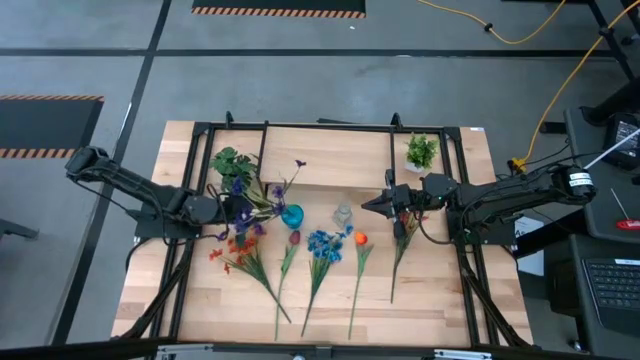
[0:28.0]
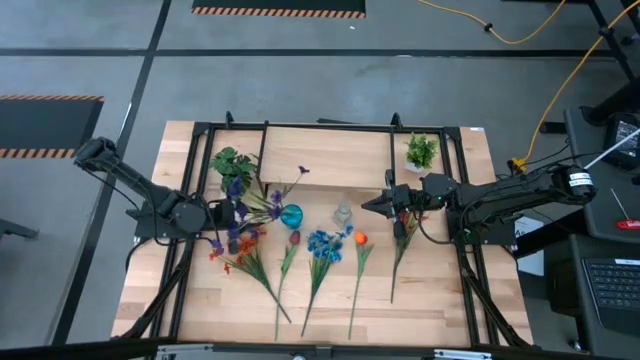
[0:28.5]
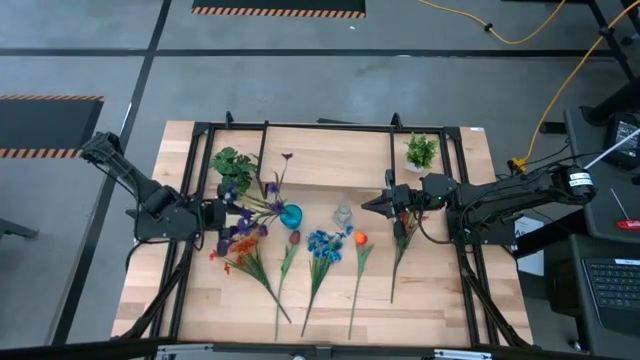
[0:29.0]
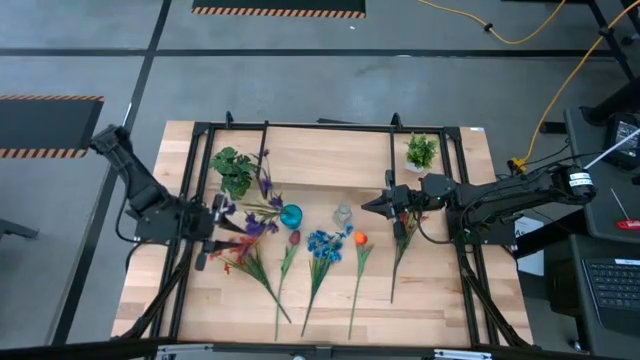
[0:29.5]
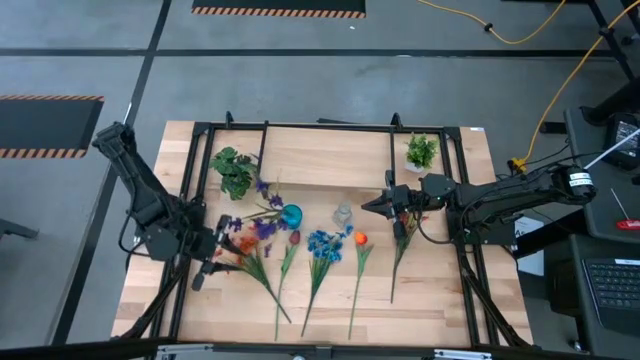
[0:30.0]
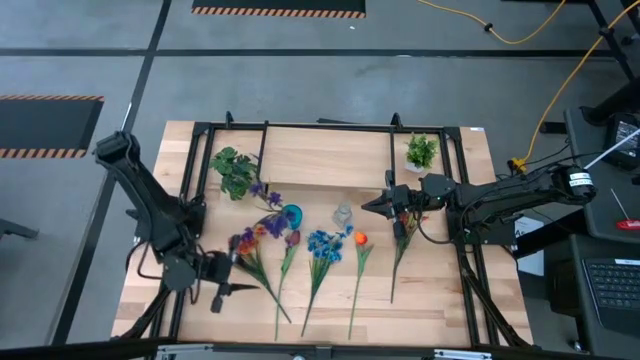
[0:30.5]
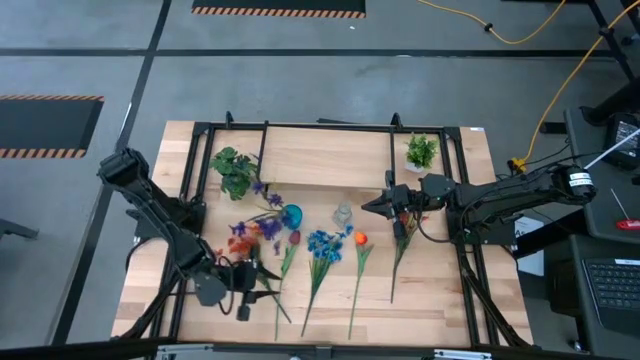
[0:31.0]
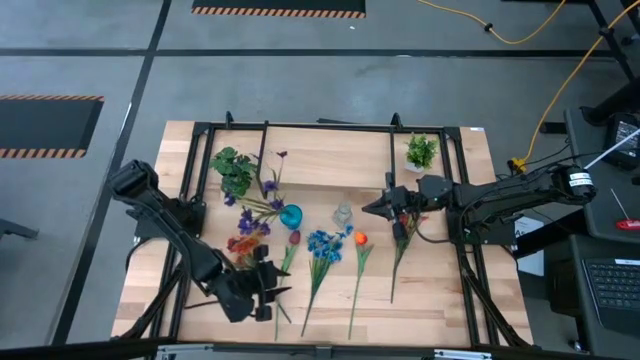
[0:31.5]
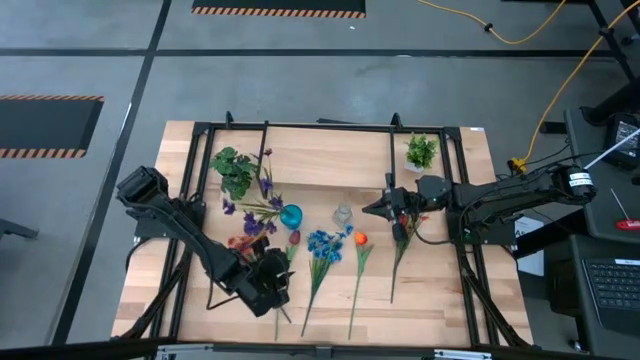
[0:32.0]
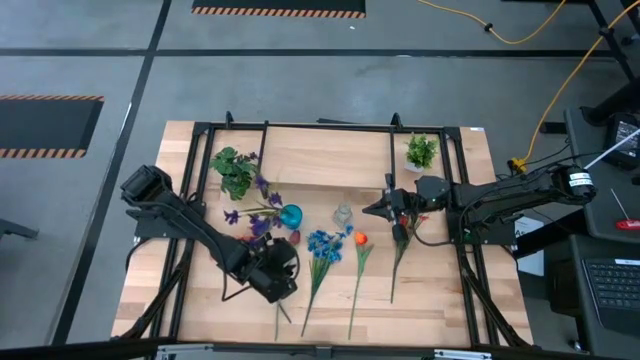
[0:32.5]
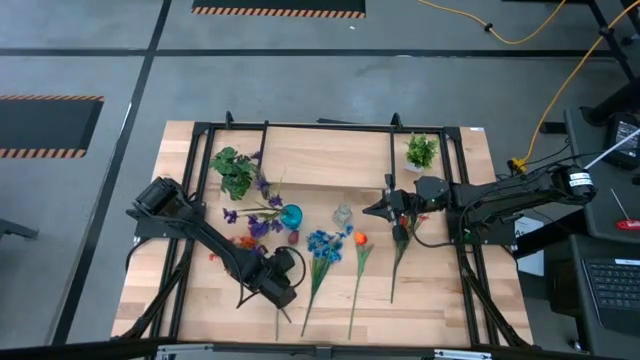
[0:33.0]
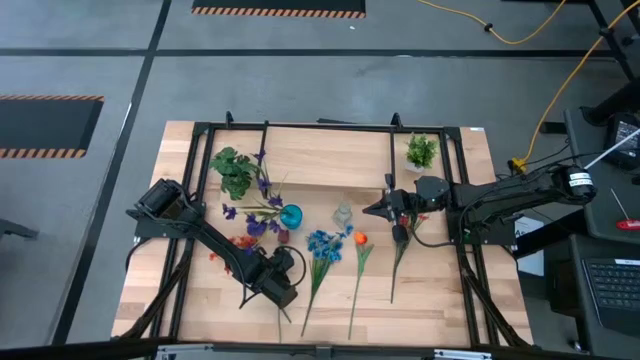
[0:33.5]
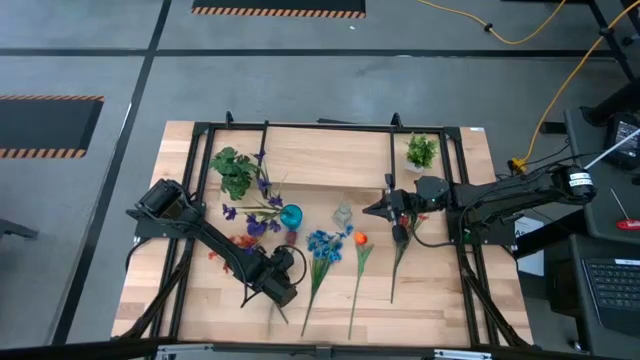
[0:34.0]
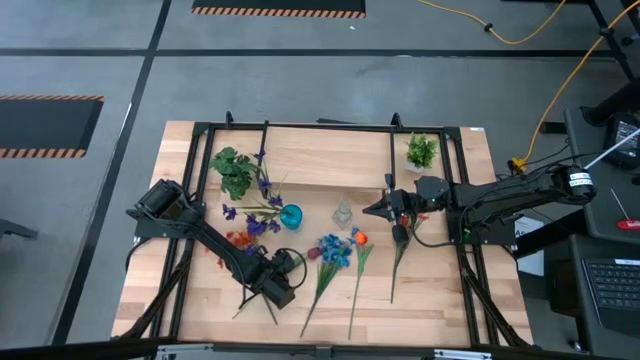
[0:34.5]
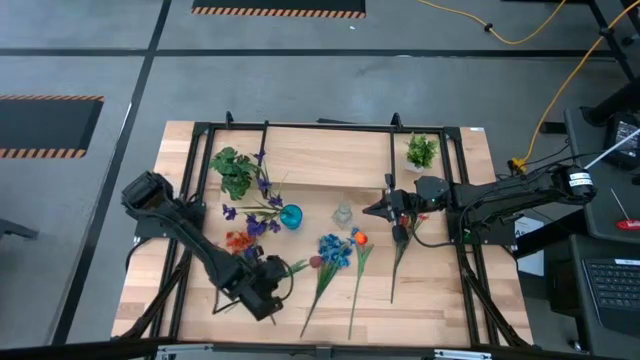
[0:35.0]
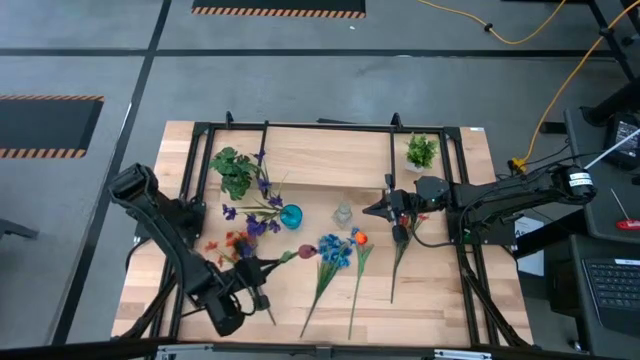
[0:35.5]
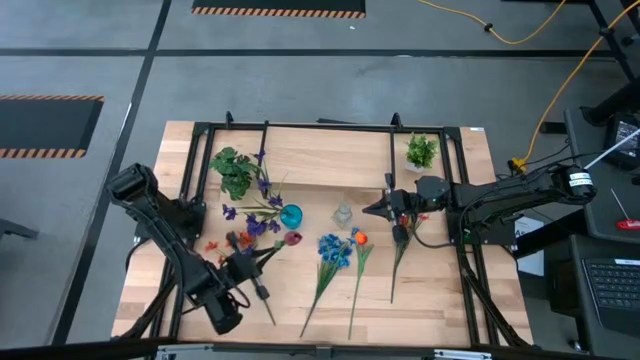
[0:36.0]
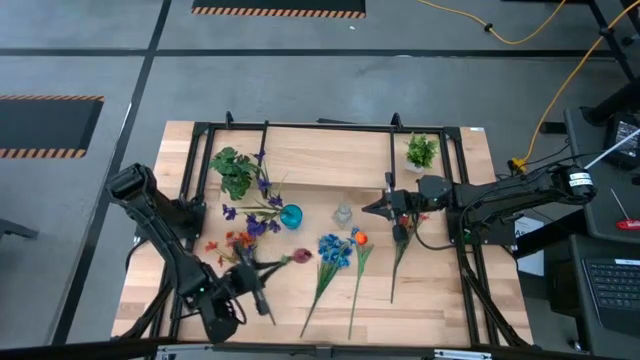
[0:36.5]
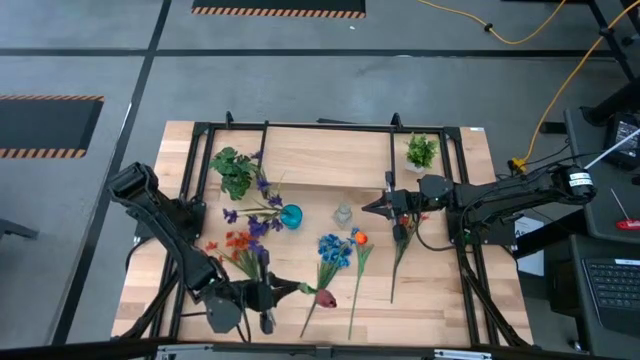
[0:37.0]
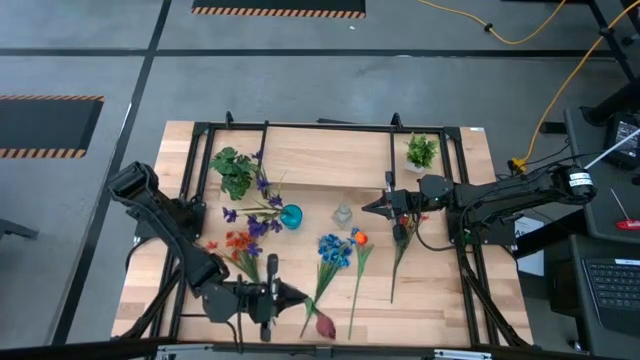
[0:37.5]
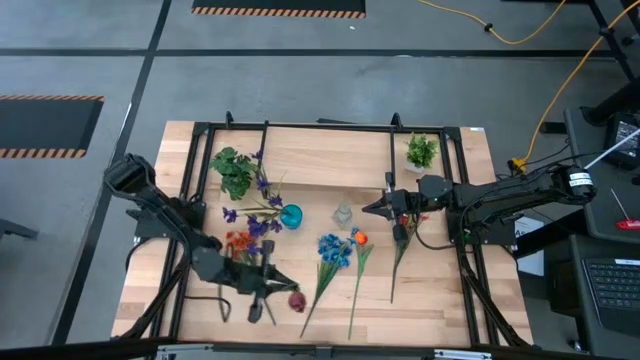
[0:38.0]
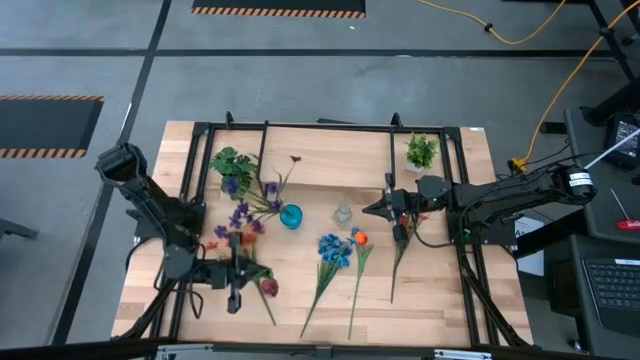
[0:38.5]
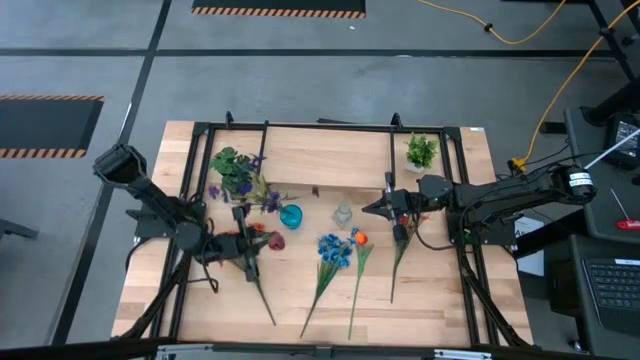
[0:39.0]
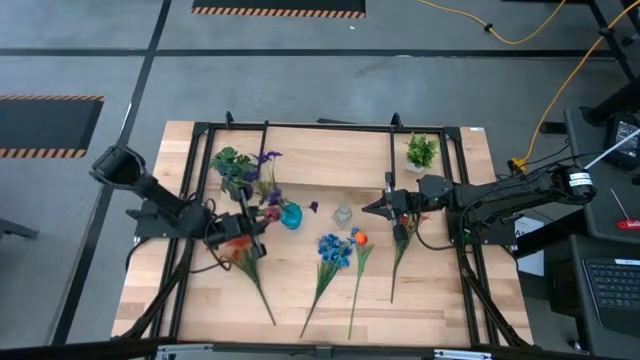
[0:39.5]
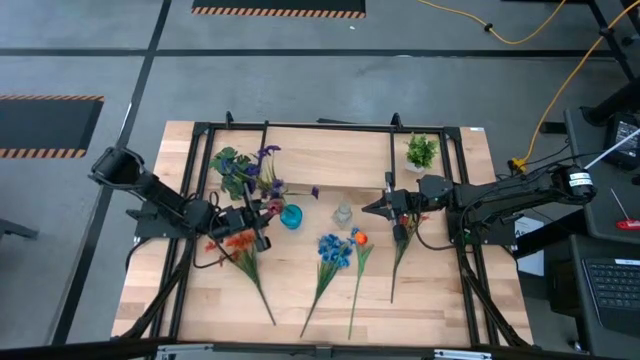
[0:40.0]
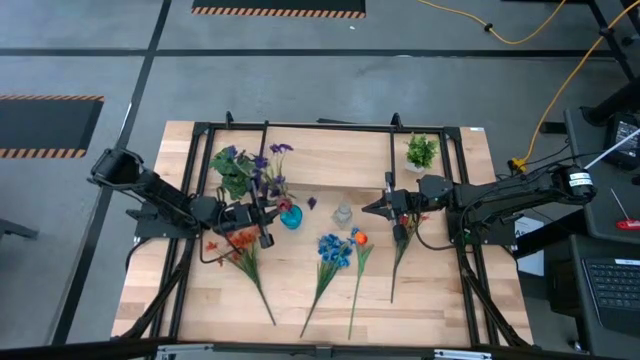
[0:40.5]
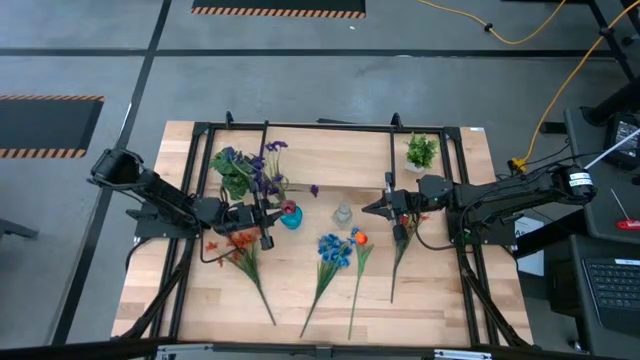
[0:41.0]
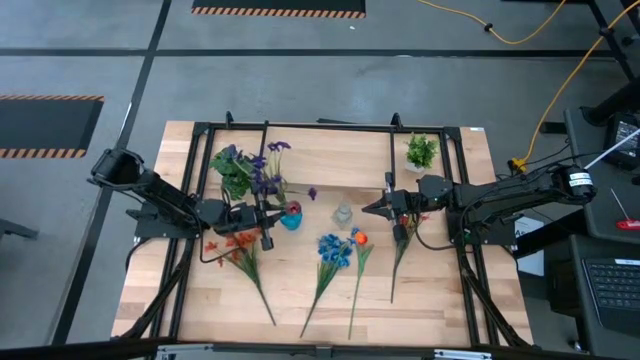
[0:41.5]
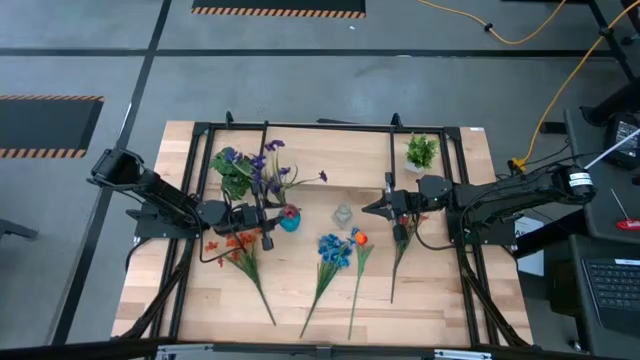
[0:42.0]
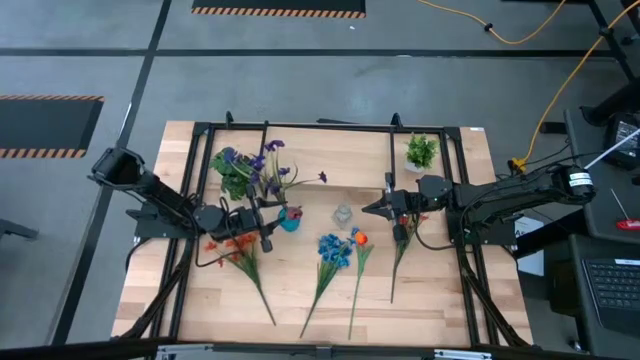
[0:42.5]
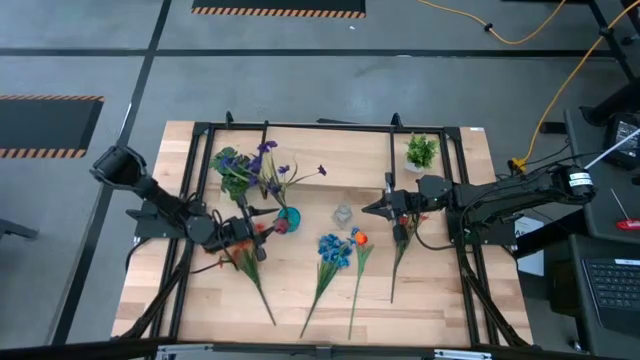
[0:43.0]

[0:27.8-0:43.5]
Task: Pick and place flowers into a vace then onto a shelf
Put the dark red flower into the transparent blue vase
